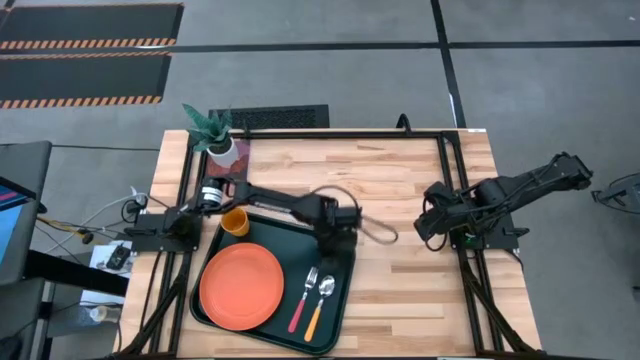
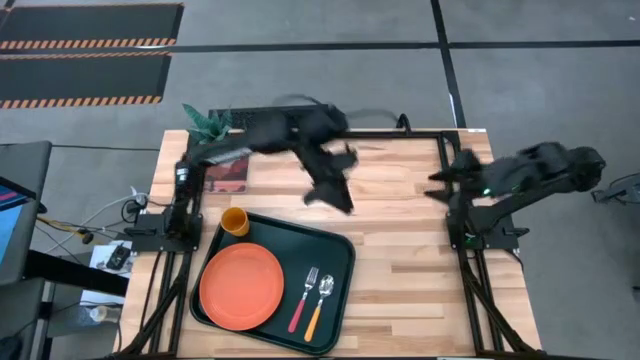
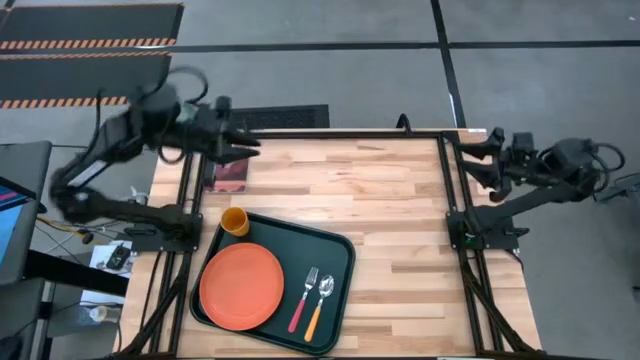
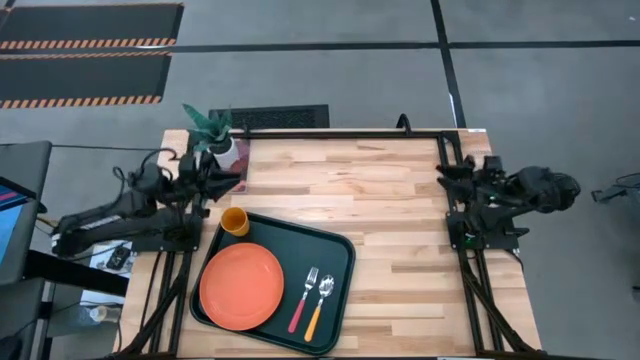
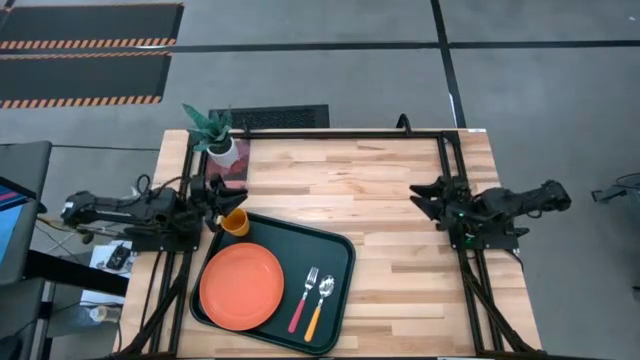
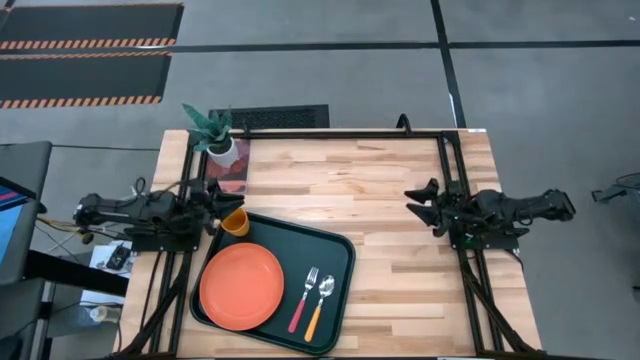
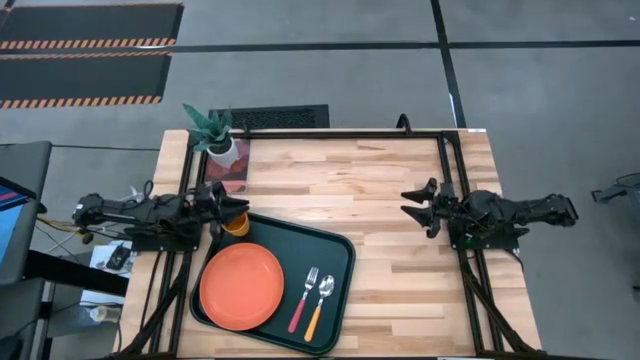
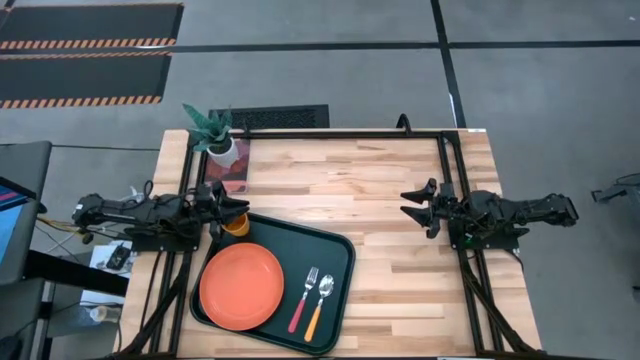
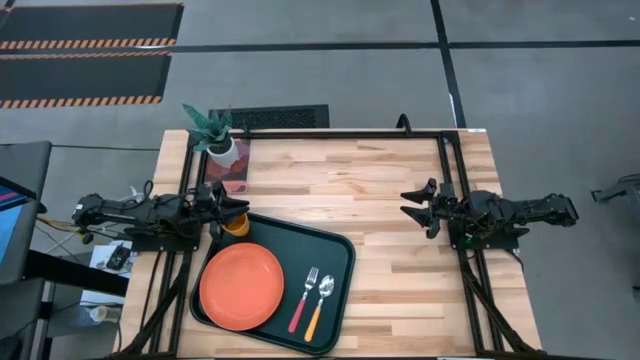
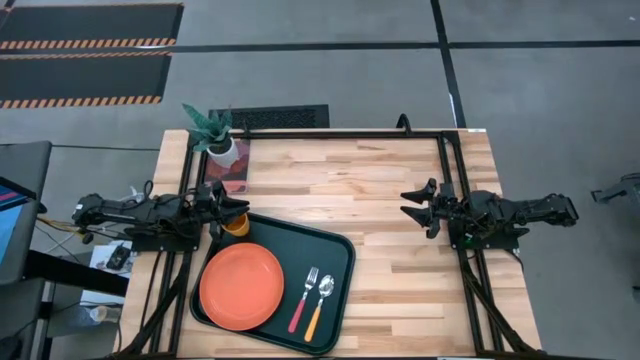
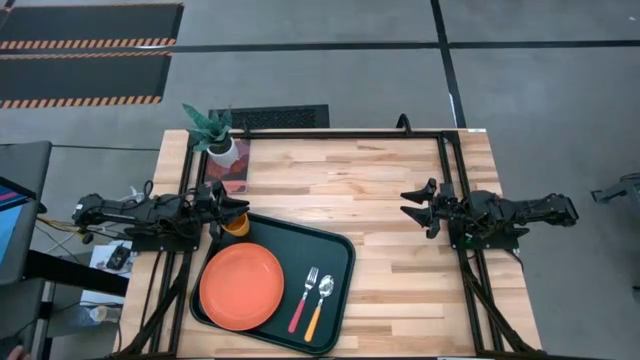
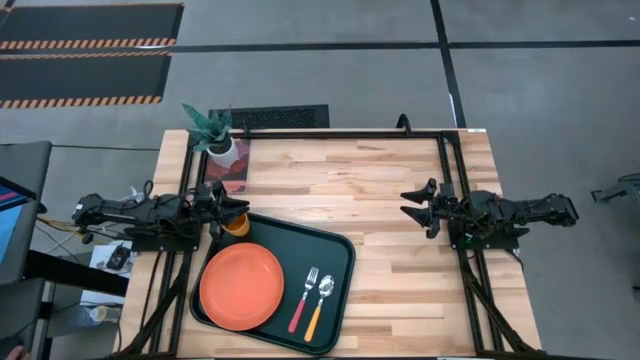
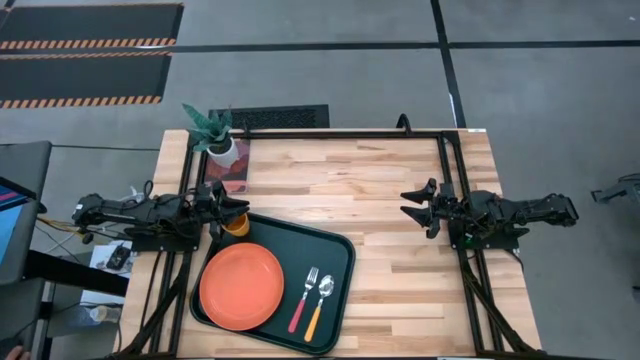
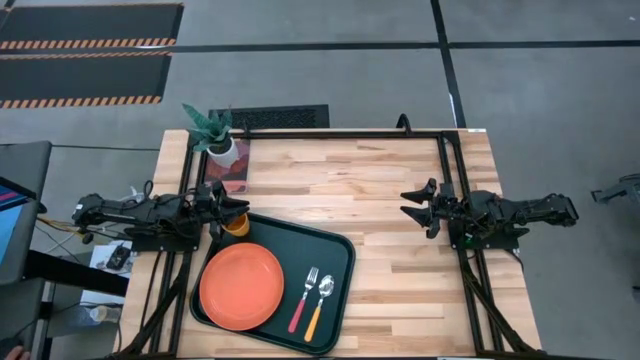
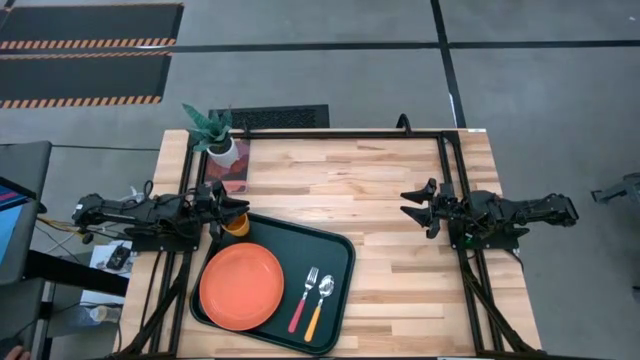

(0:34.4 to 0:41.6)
Task: Pick and place plate/cup/fork/spoon on tray
Return to Home Position

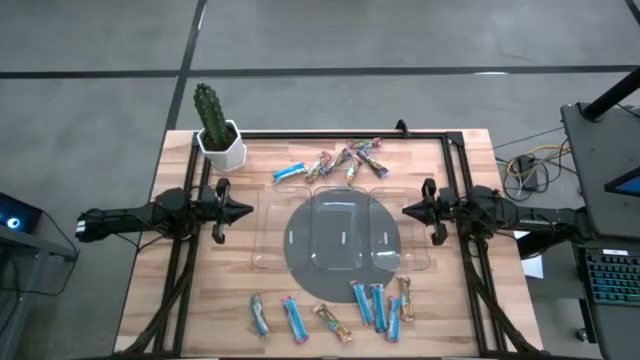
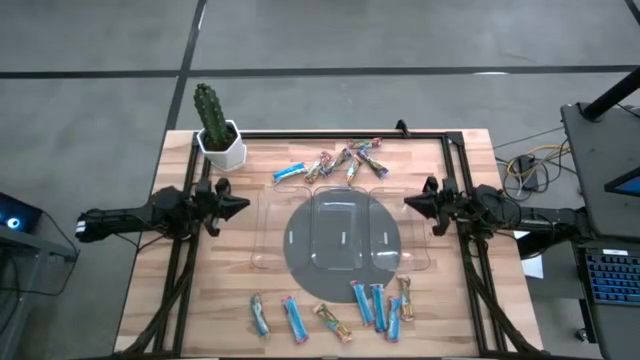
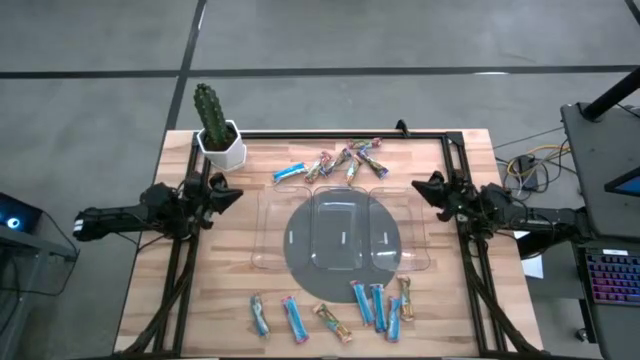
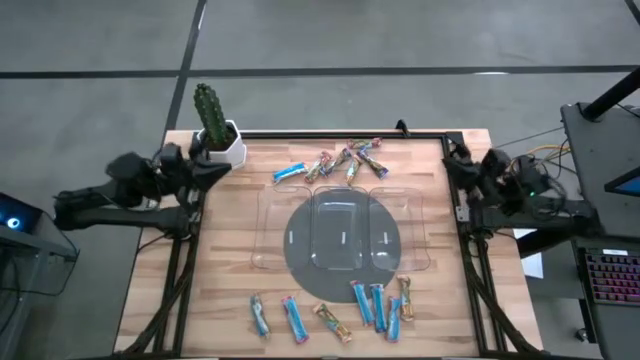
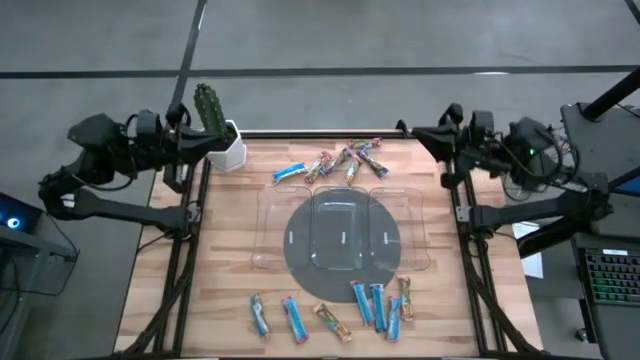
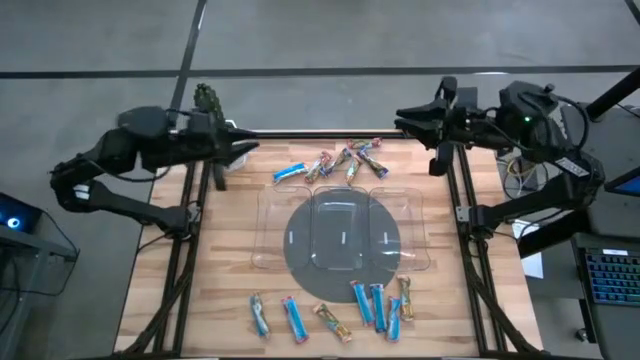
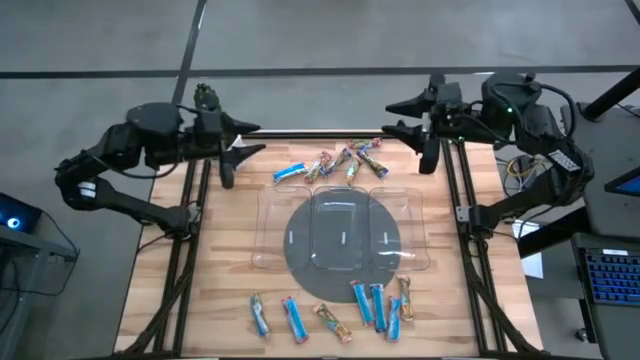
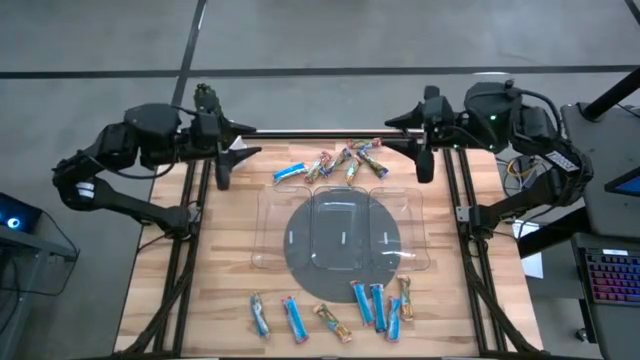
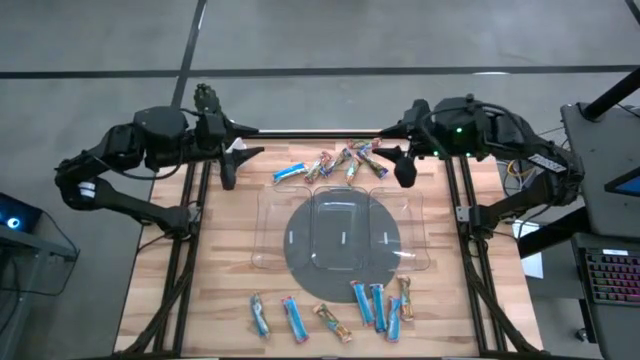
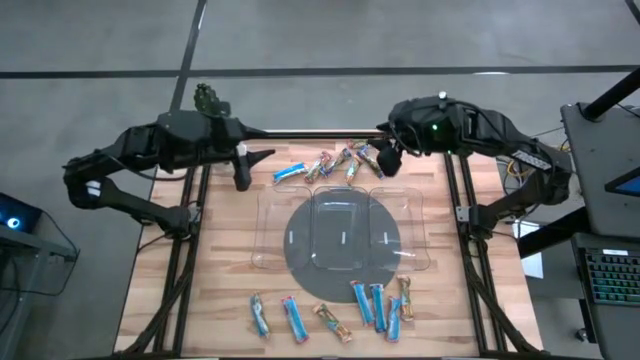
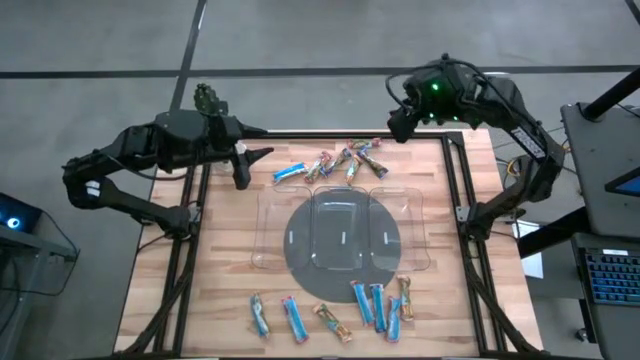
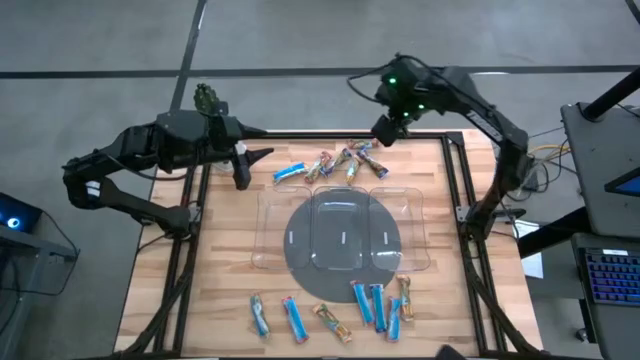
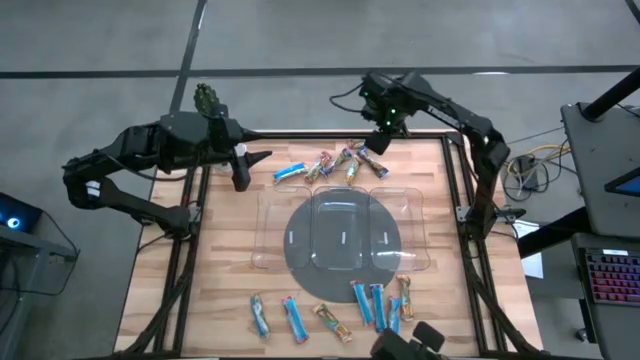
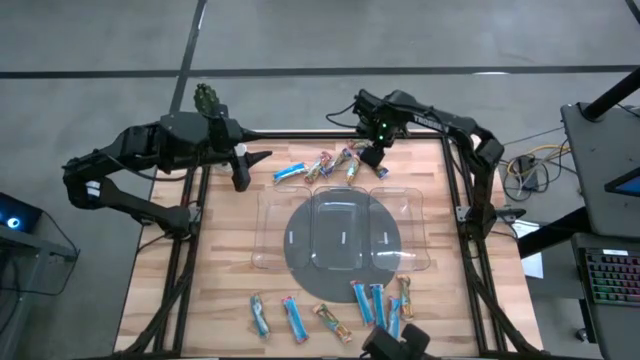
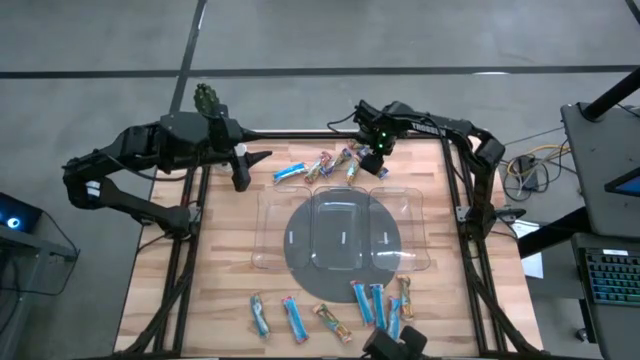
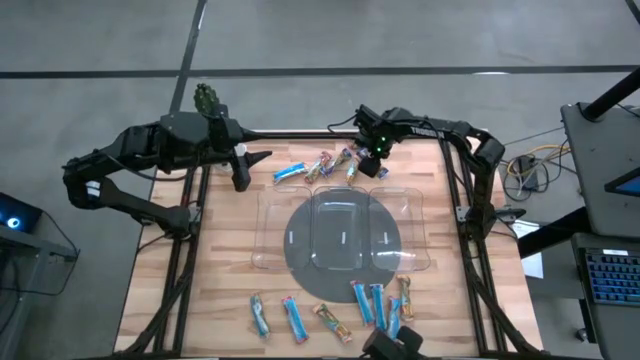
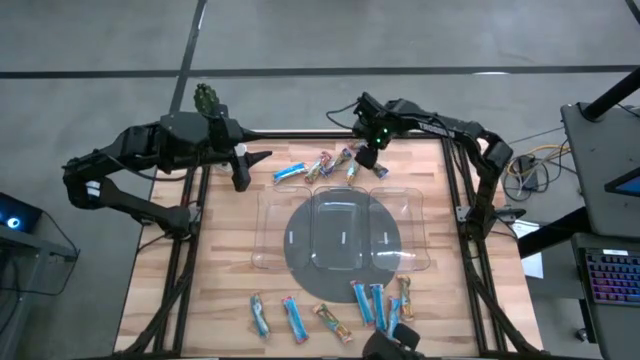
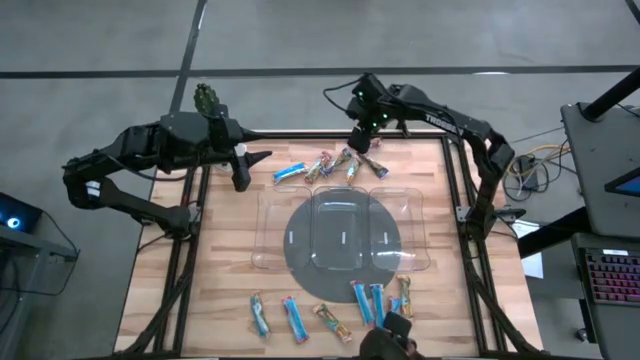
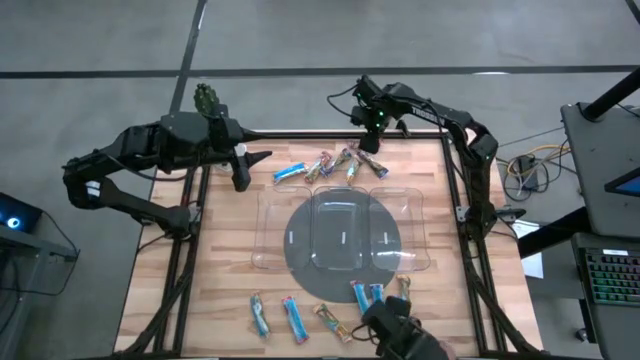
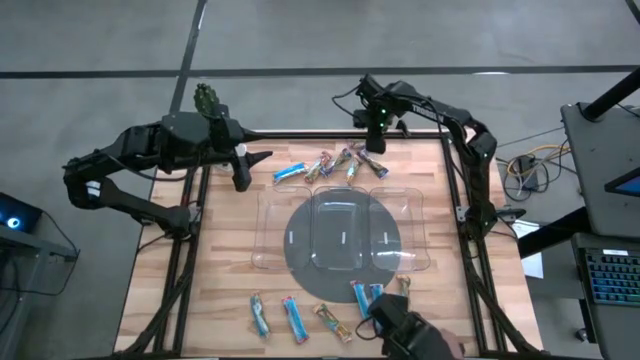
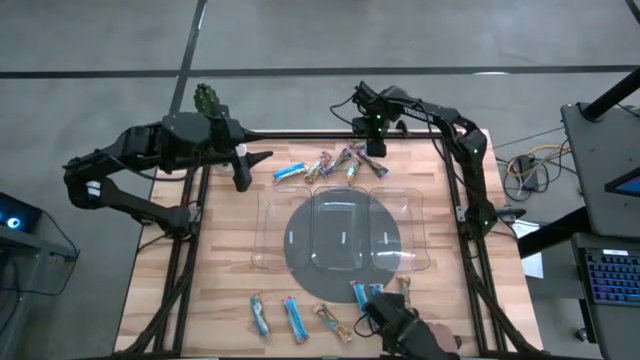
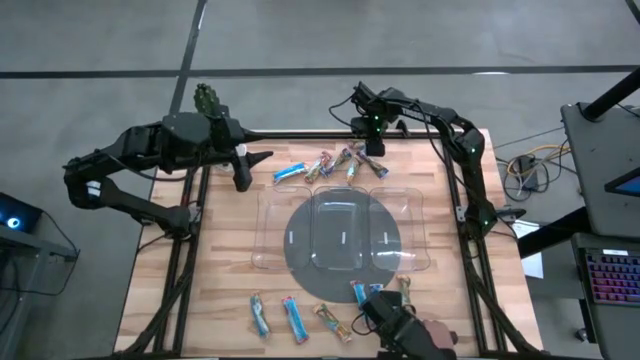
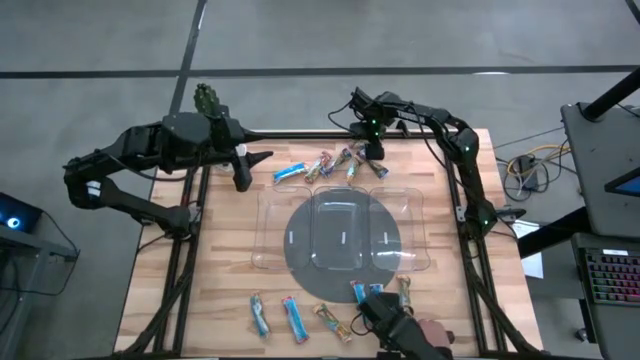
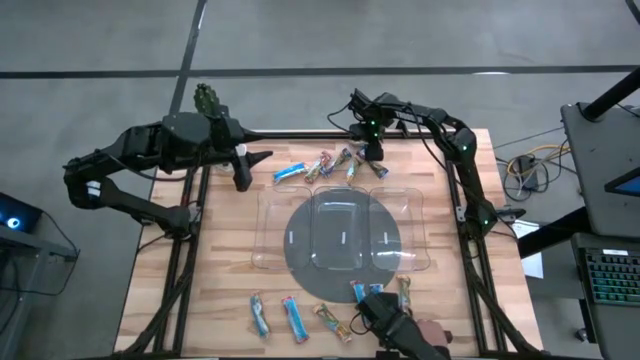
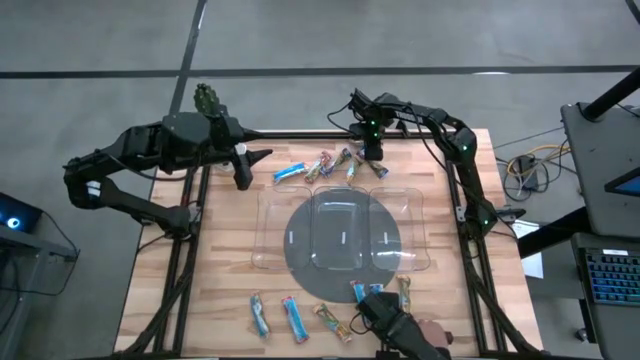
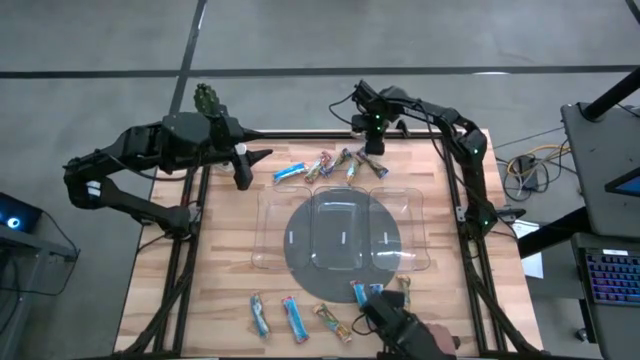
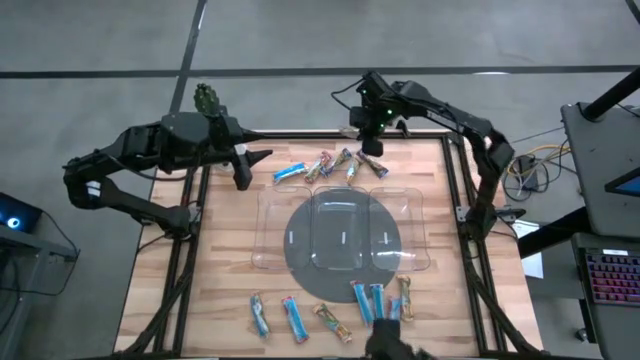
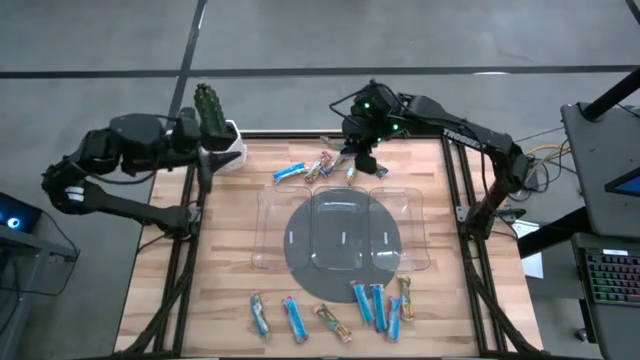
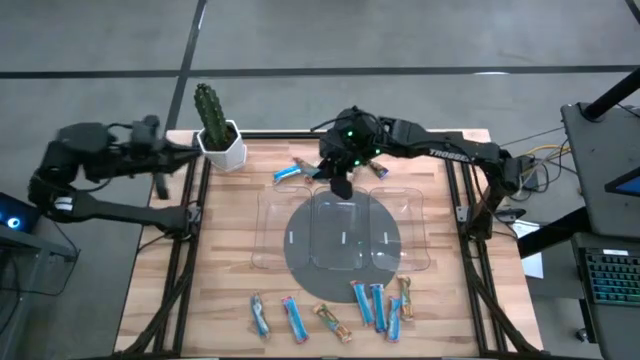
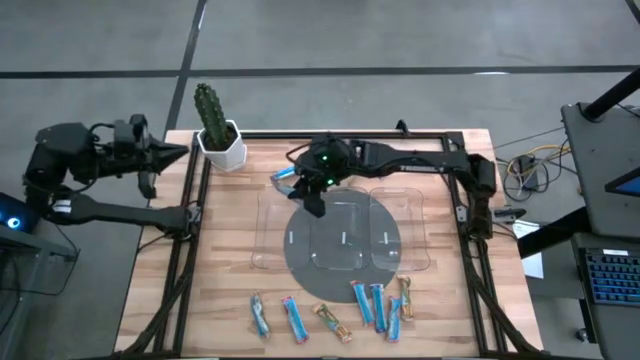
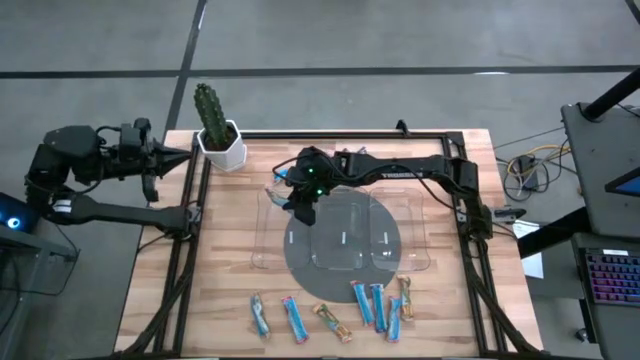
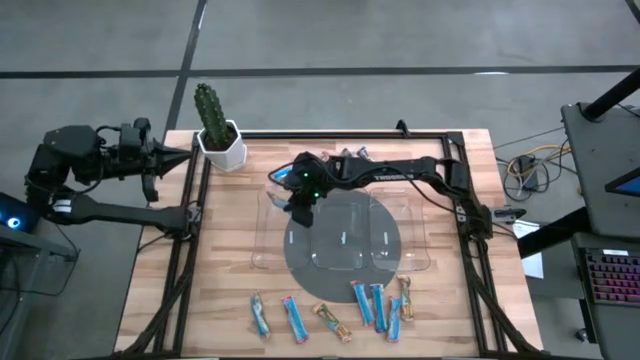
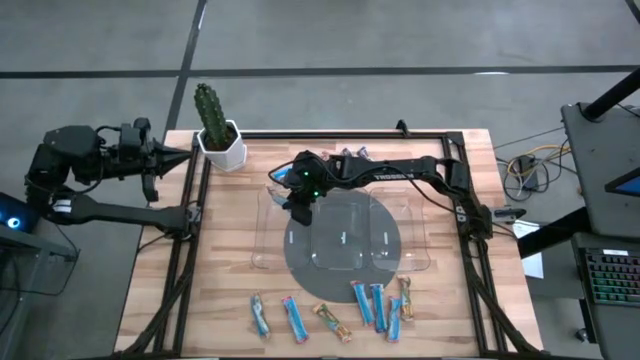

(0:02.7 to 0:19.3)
Task: Pick and place Granola Bars by type
Put the red granola bar into the left transparent bin
